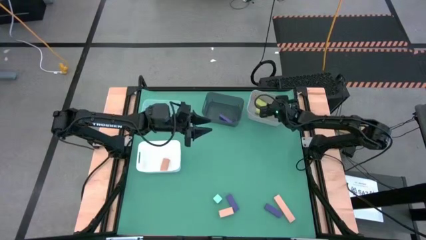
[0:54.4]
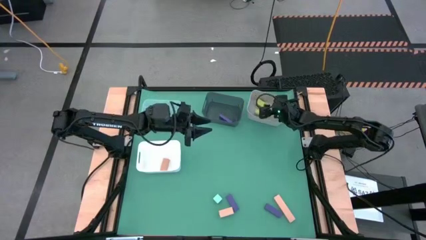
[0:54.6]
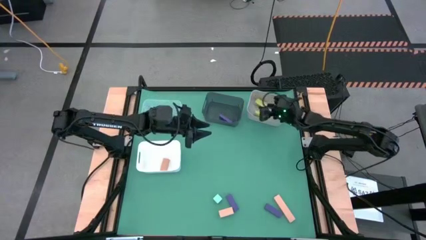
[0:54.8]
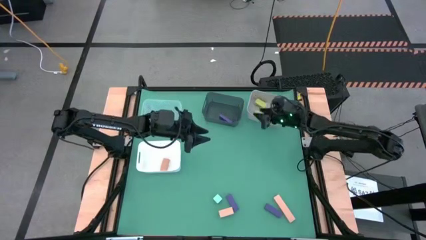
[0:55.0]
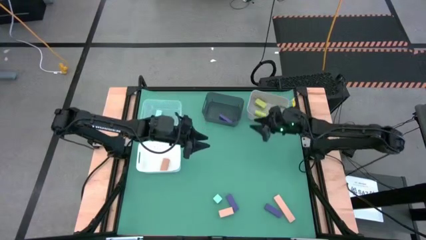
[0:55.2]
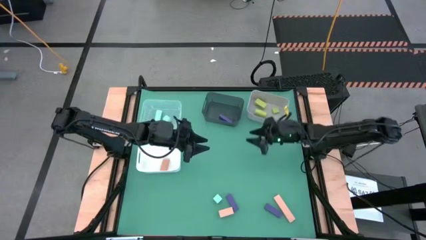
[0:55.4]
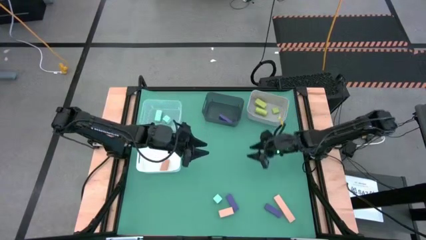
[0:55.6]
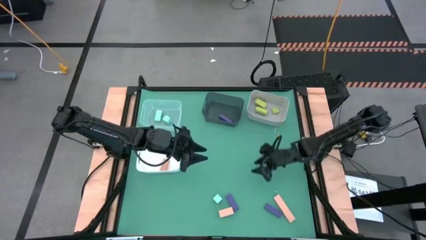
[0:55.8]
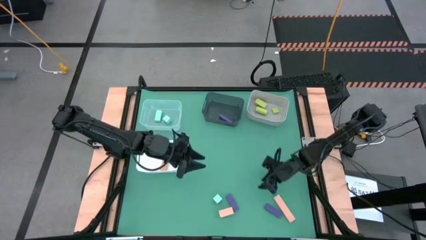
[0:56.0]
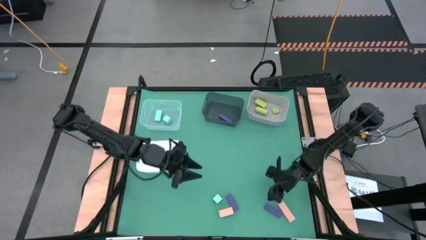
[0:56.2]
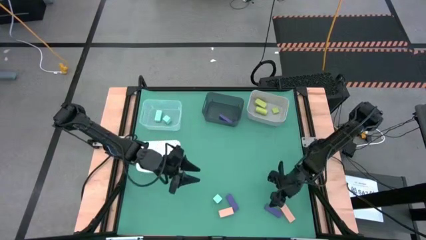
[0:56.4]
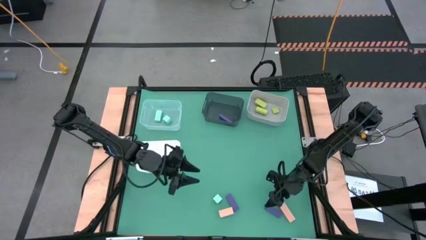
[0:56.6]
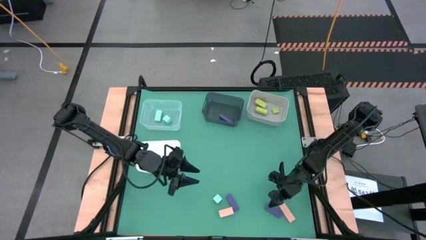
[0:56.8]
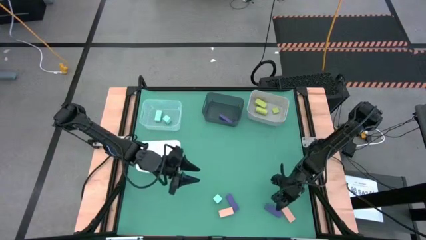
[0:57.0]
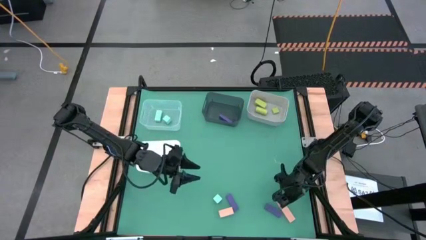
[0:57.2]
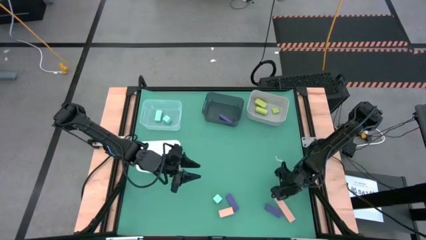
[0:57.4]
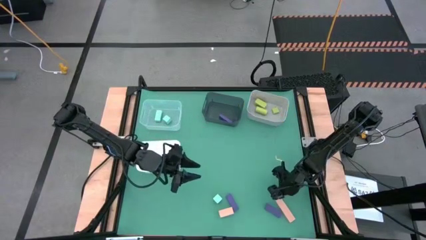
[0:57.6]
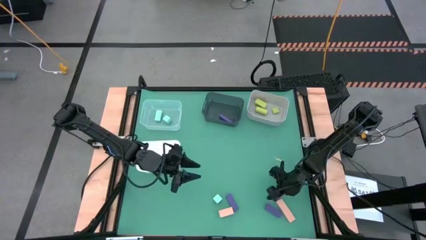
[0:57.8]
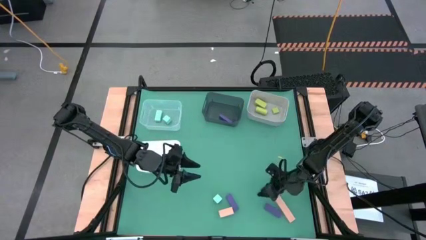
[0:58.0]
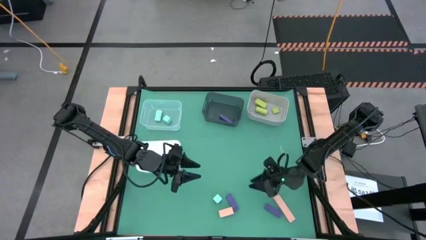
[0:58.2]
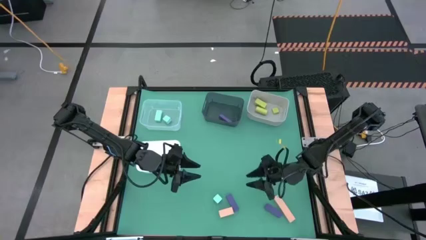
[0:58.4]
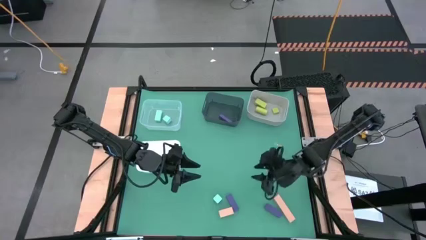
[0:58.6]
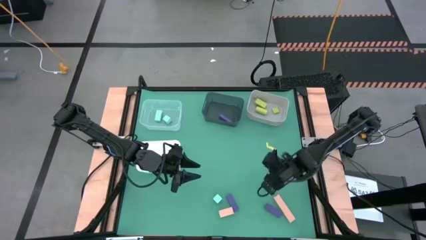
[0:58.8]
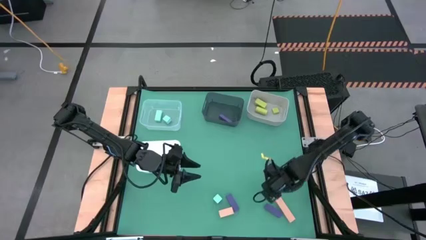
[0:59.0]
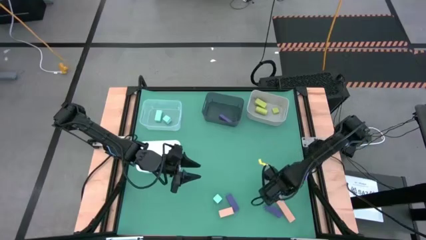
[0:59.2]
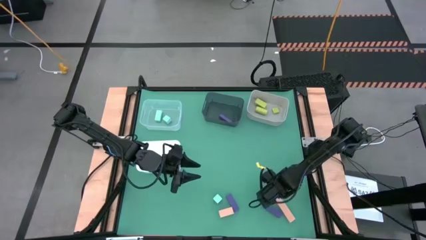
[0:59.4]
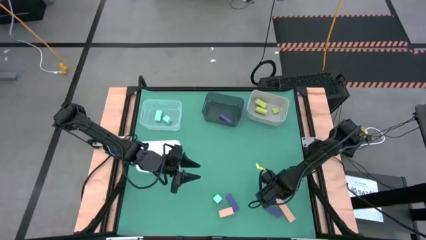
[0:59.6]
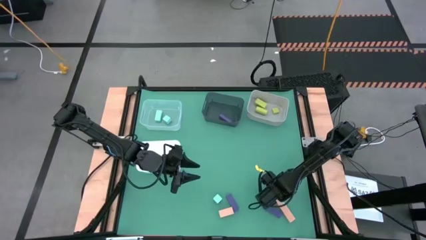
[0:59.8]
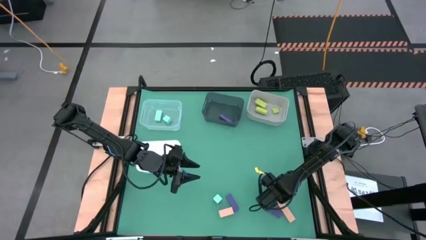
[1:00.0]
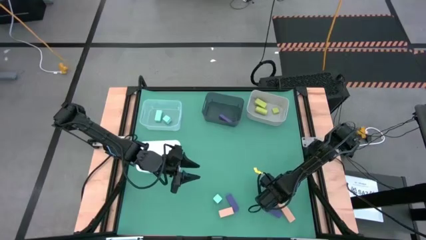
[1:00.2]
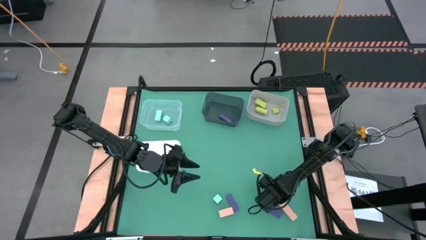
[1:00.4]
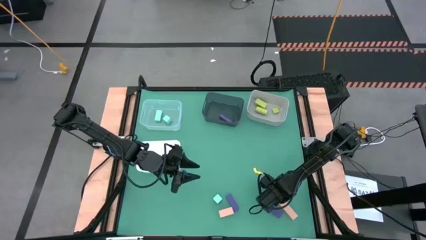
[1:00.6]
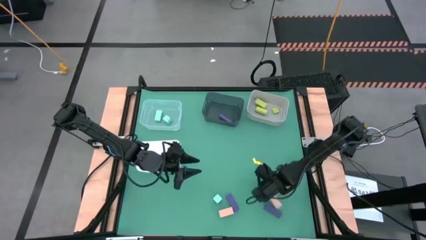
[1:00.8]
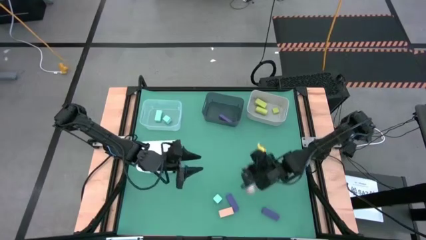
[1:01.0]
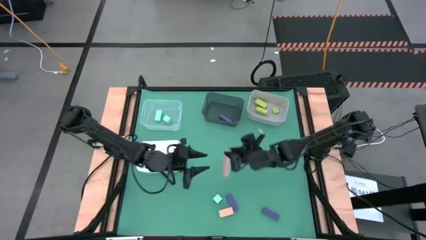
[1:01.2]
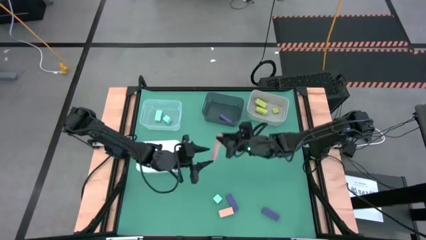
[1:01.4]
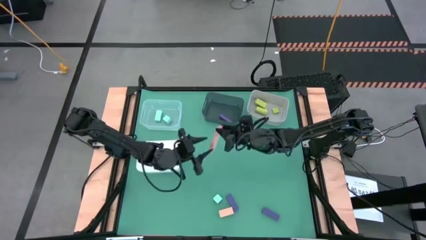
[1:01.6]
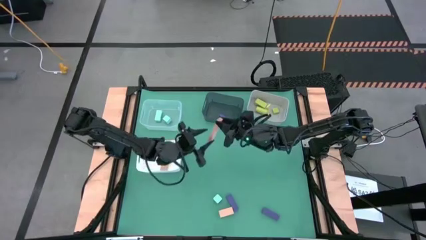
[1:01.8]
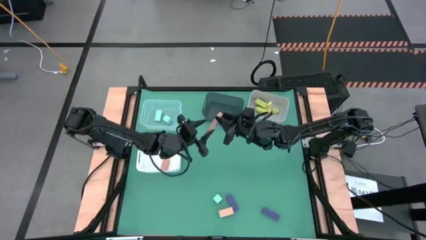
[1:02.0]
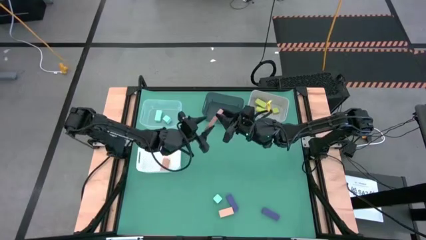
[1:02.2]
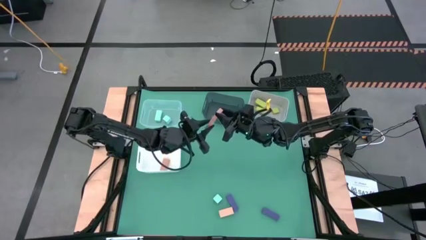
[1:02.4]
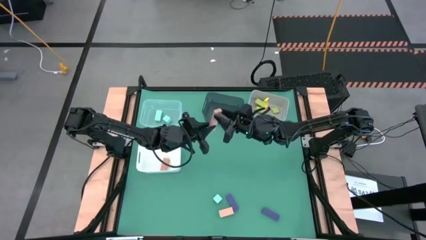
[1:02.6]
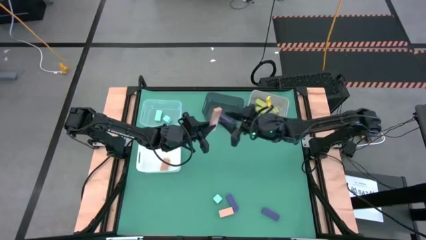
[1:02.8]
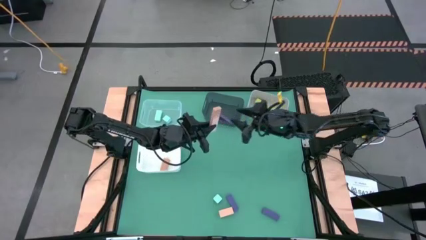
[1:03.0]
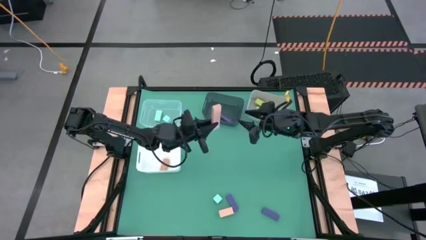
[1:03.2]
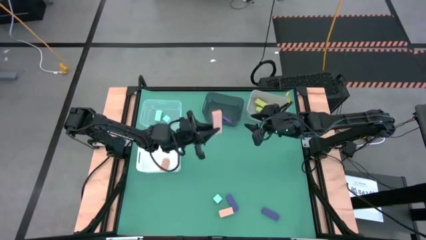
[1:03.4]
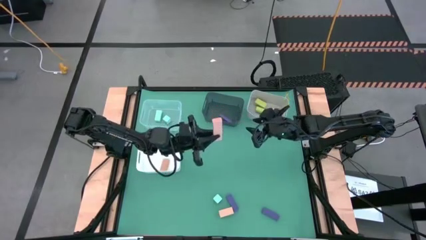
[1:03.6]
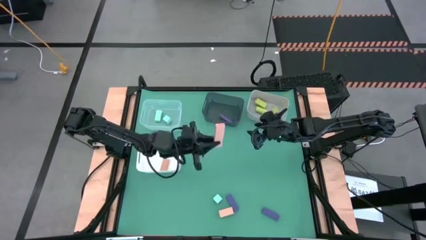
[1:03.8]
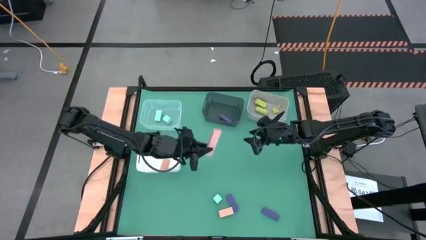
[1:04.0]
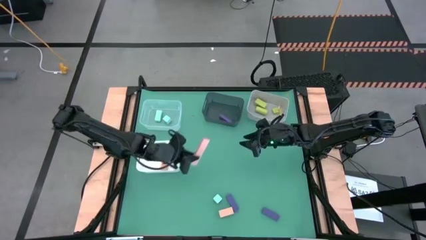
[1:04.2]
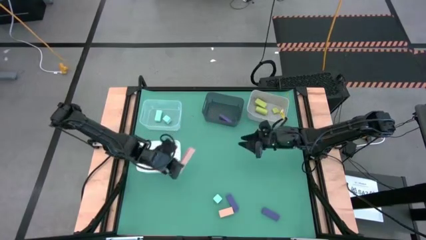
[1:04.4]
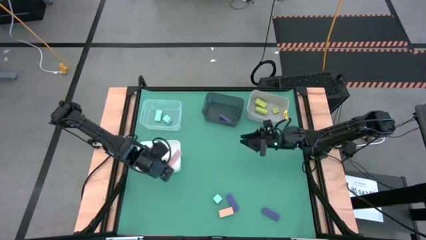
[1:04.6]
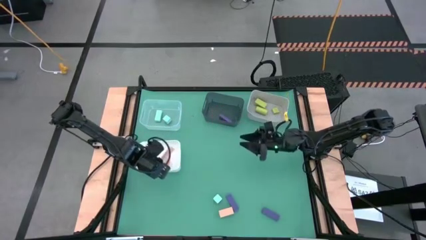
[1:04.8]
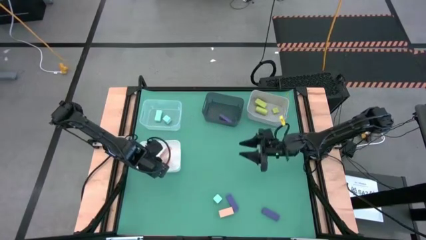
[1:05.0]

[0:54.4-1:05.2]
Task: Sort & place blocks by color
Put the right brown block into the white bin
